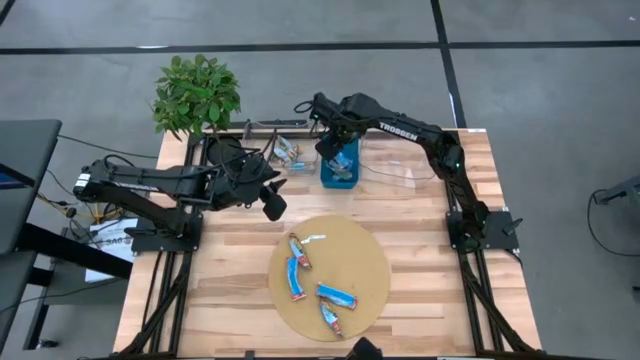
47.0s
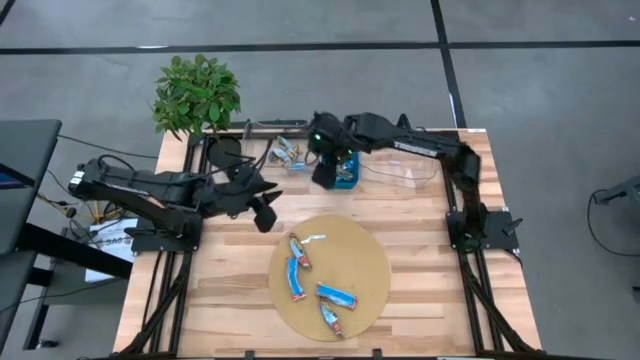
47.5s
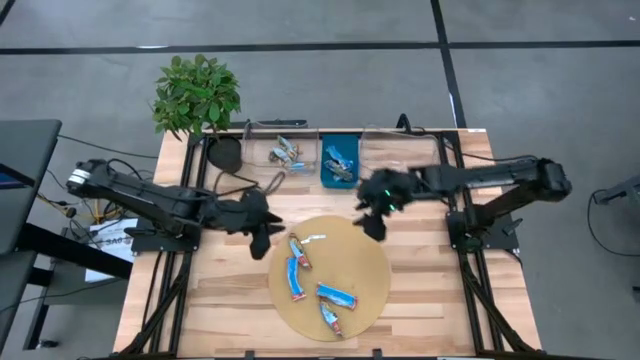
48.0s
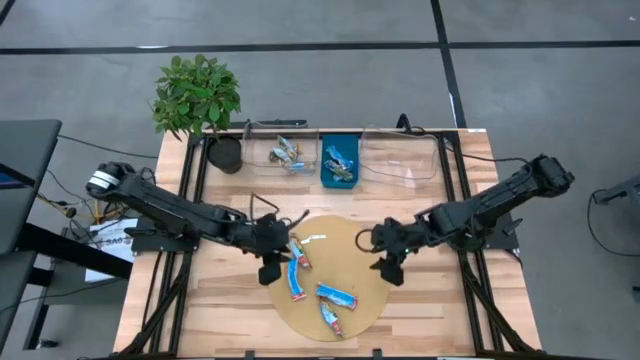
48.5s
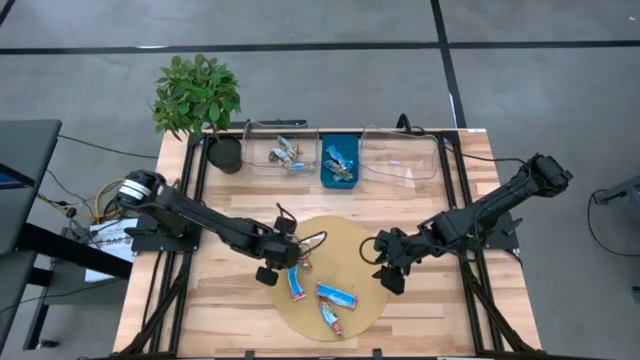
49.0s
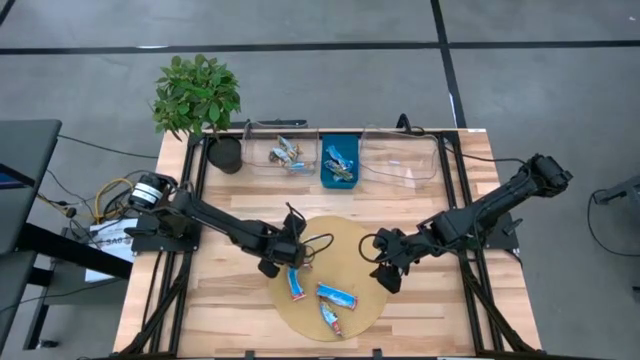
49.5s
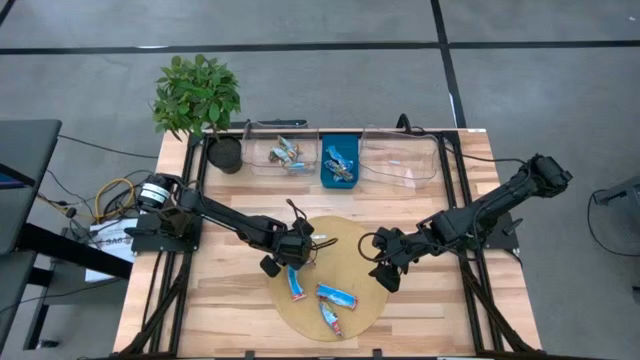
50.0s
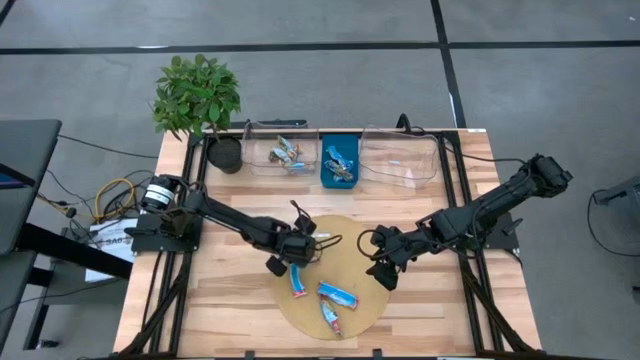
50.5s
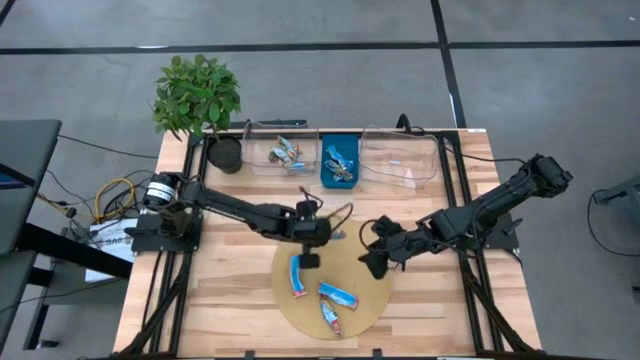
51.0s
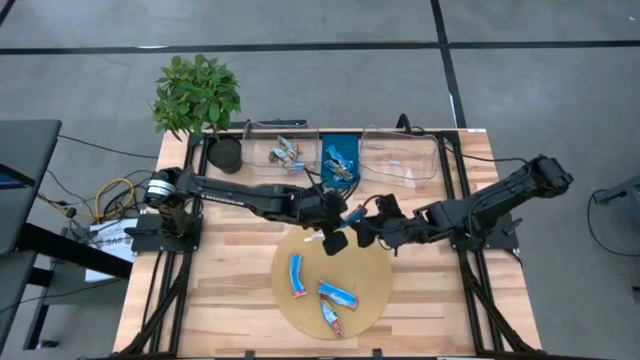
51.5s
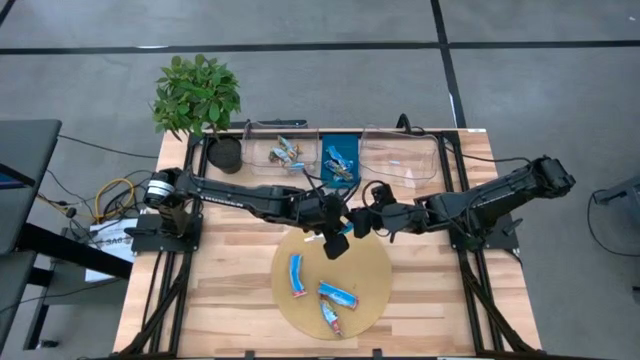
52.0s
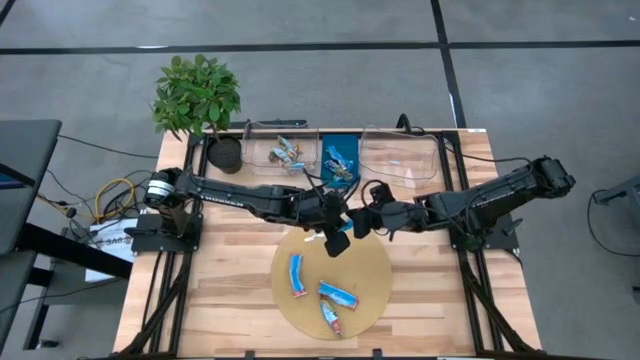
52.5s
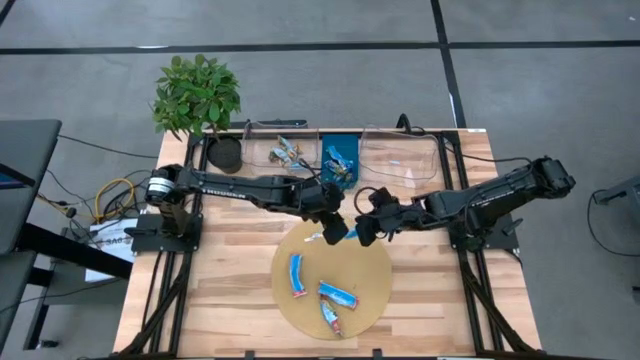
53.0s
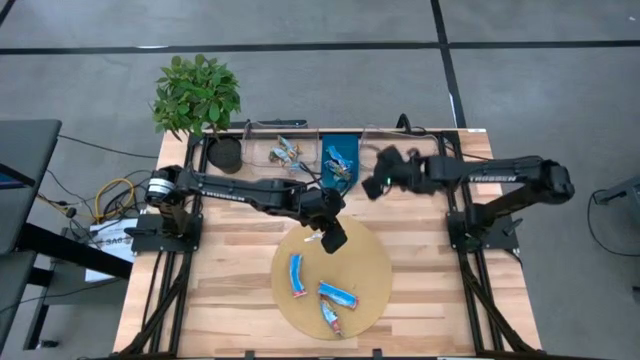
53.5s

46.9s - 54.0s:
Task: Pick and place Granola Bars by type
Put the red granola bar into the right transparent bin

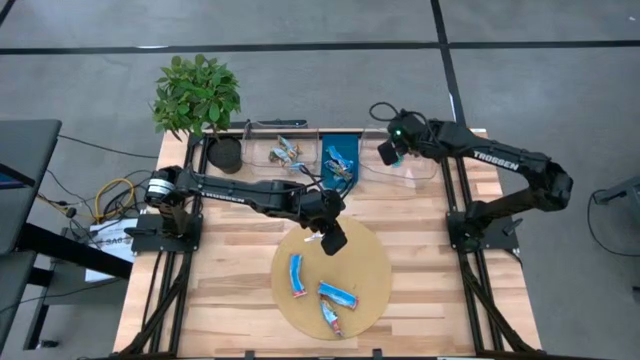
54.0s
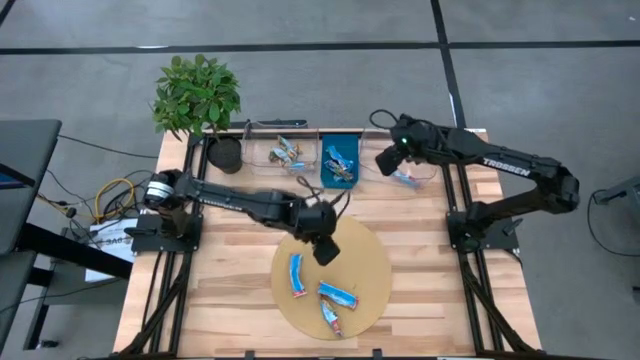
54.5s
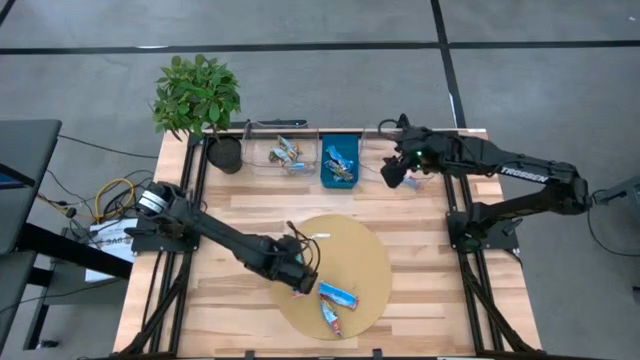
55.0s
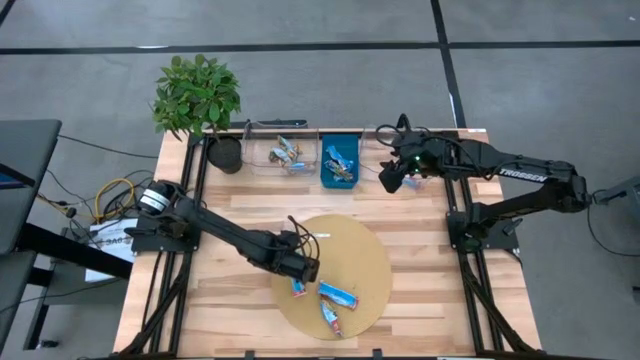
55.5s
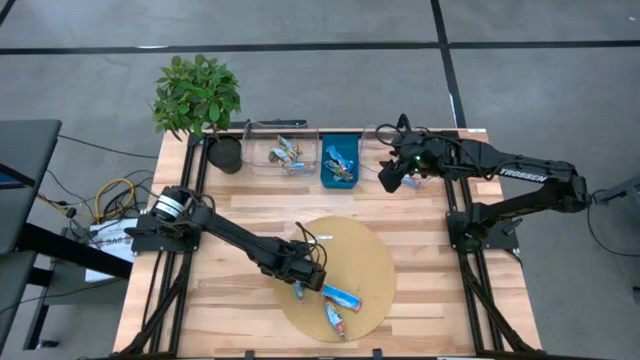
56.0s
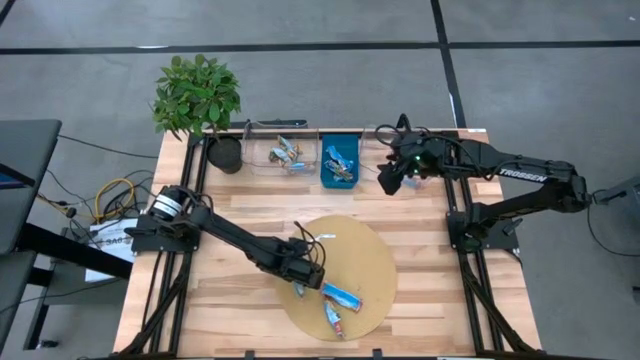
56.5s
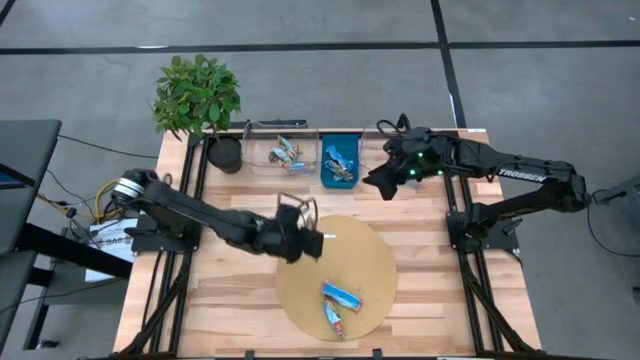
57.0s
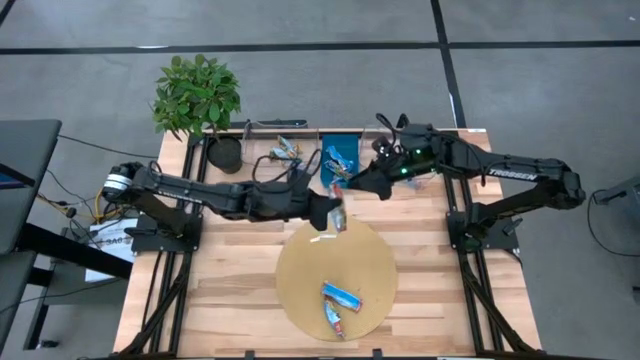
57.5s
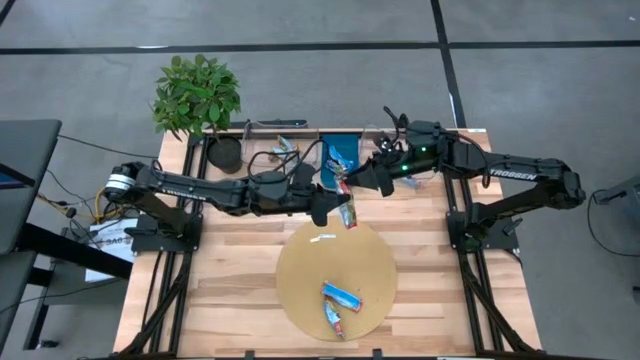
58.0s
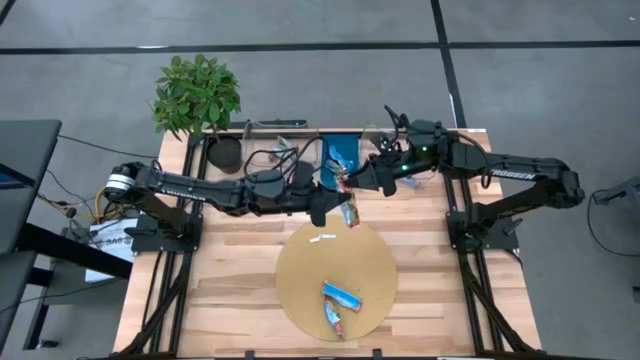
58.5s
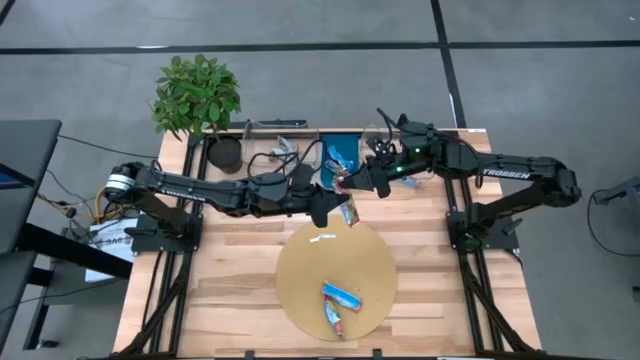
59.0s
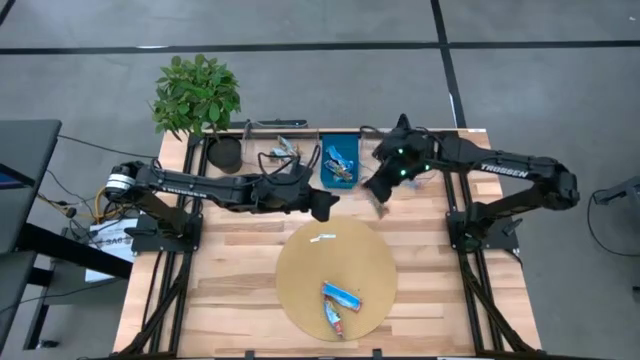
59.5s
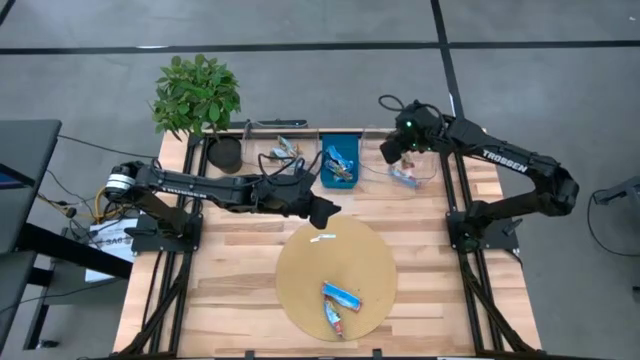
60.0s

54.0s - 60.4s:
Put the red granola bar into the right transparent bin

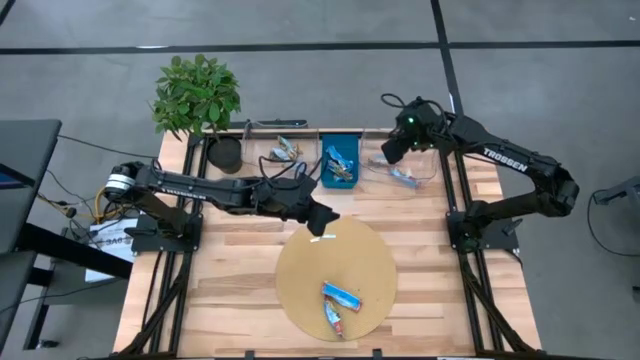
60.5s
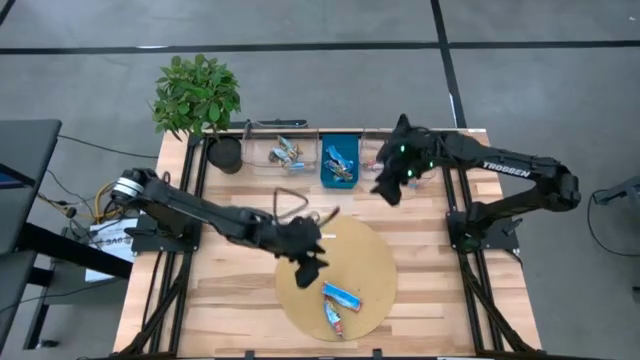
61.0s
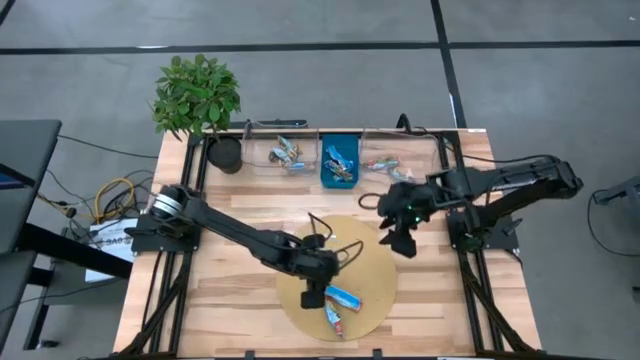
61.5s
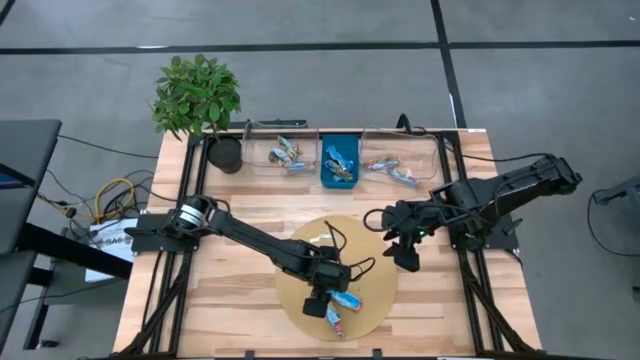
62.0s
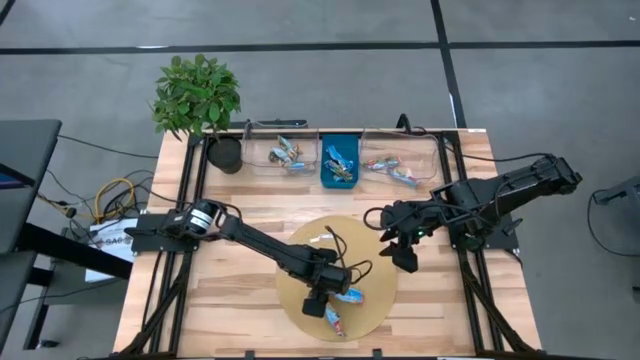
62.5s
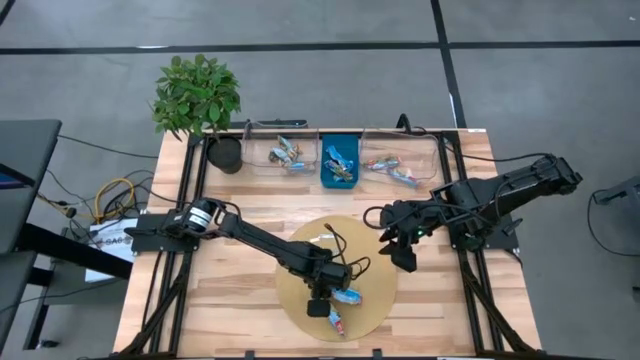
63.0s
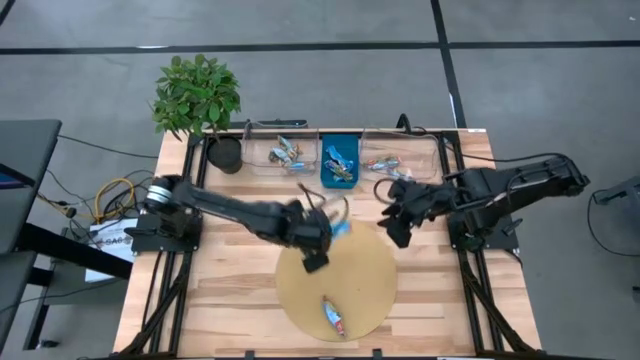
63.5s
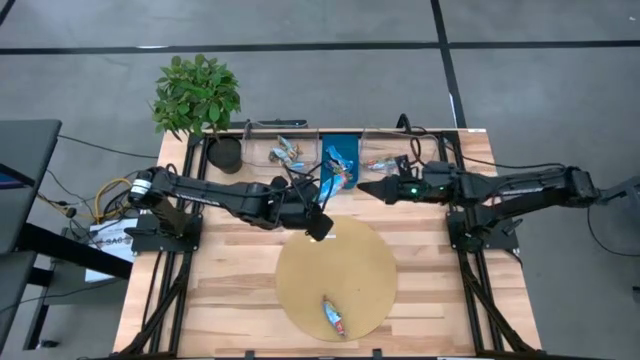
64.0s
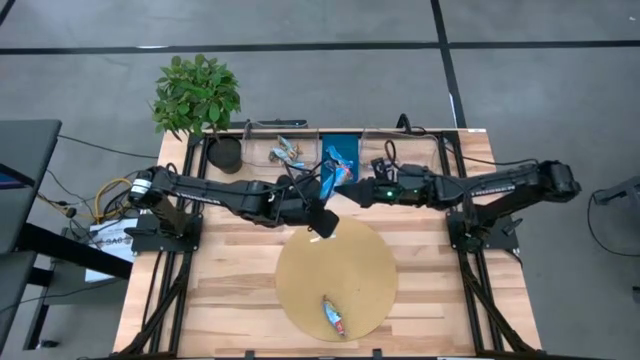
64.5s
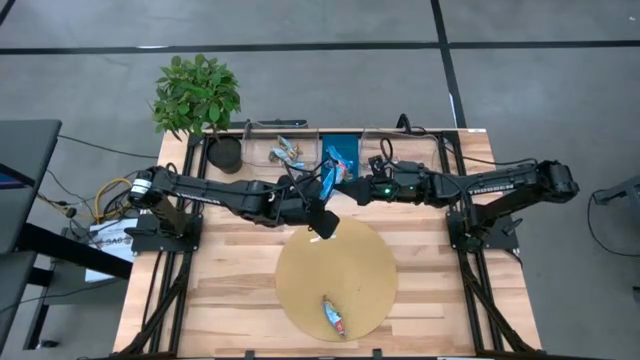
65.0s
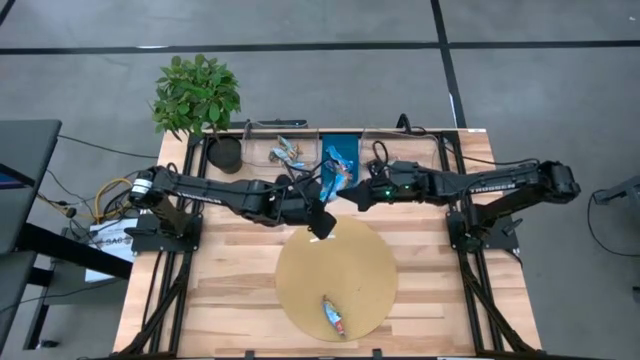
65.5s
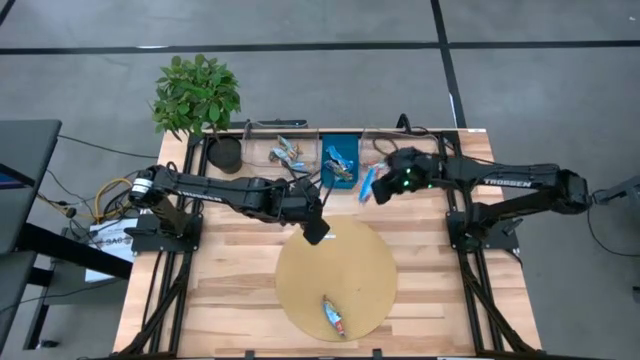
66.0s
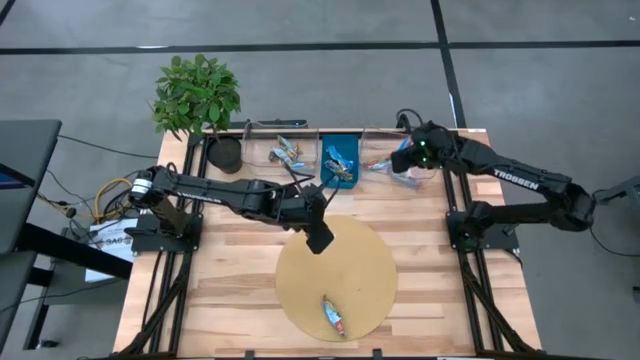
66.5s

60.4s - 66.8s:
Put the red granola bar into the right transparent bin

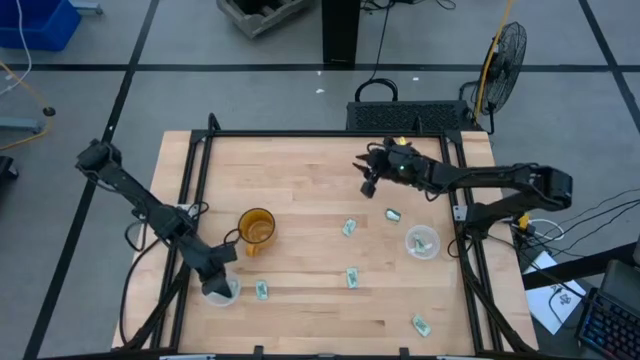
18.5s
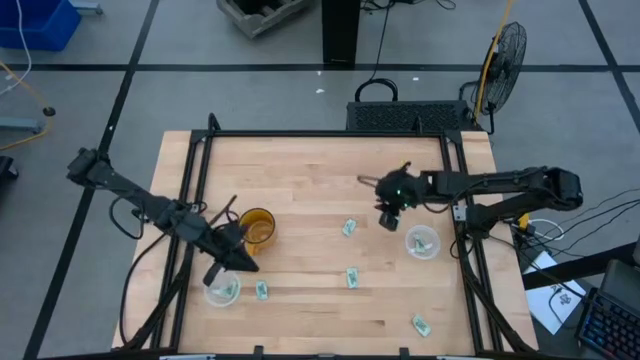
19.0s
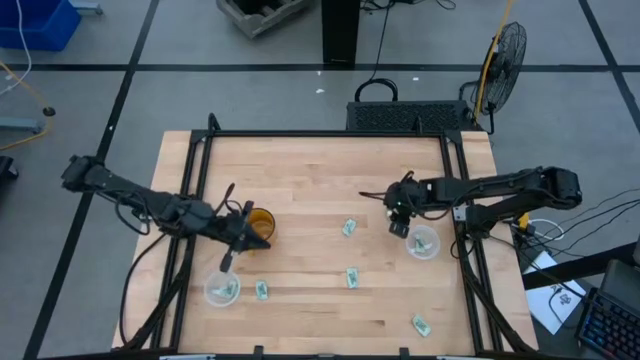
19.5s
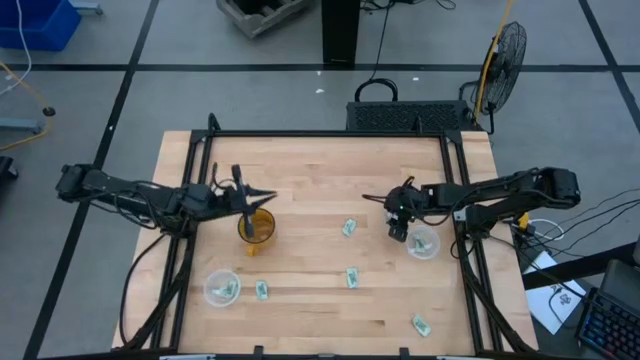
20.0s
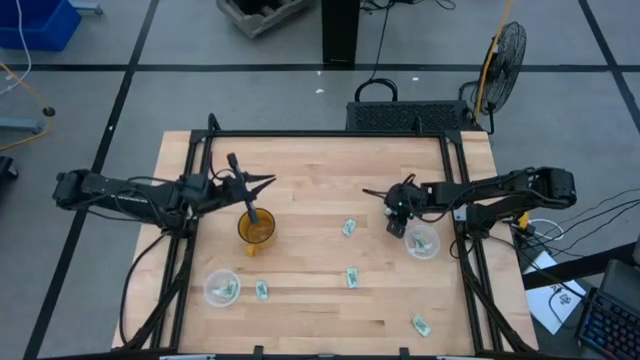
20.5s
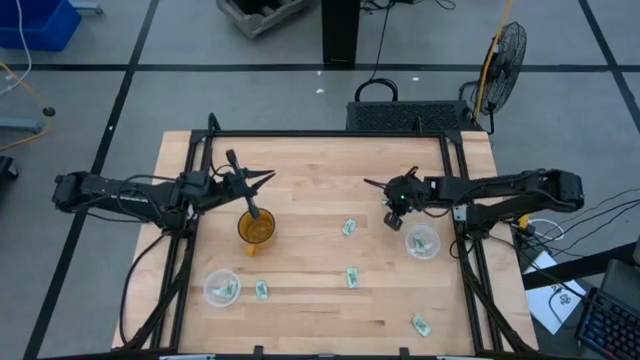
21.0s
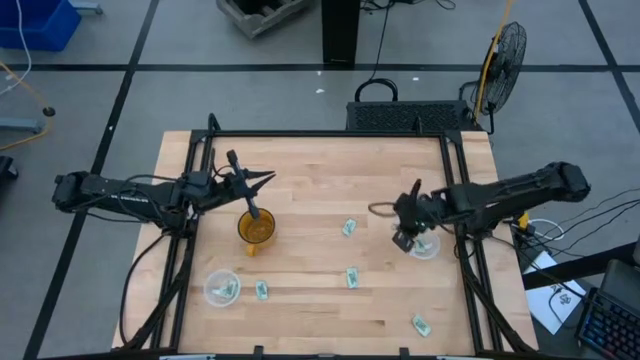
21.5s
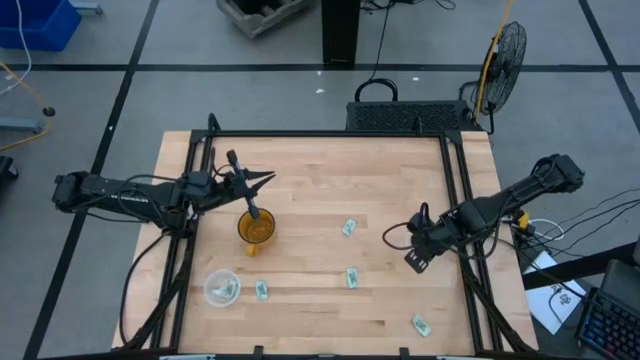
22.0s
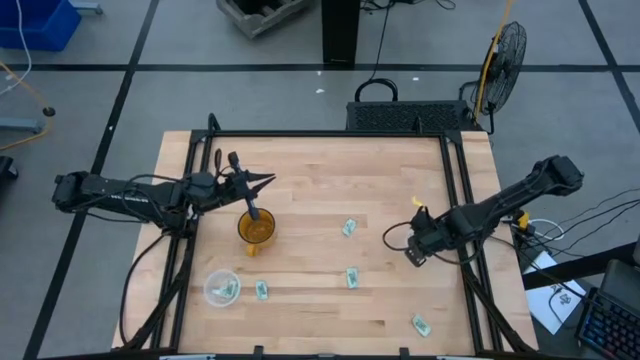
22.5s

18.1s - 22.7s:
Task: Pick and place Stevia / Truvia into bins
Put the truvia packet into the right transparent container
